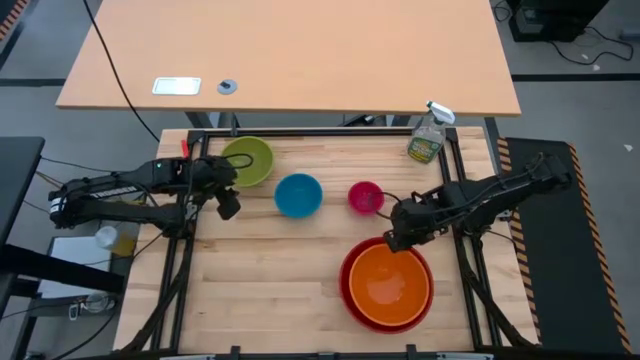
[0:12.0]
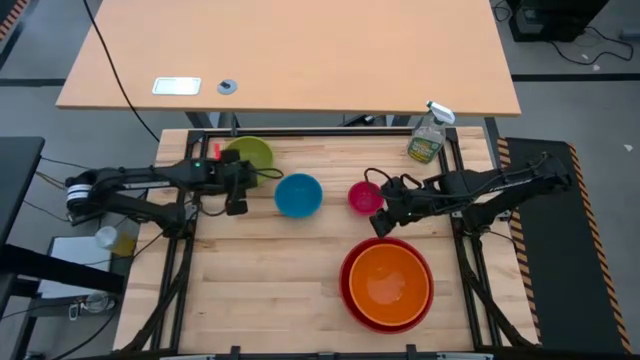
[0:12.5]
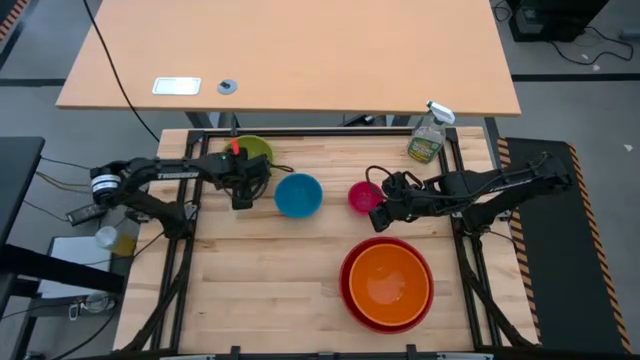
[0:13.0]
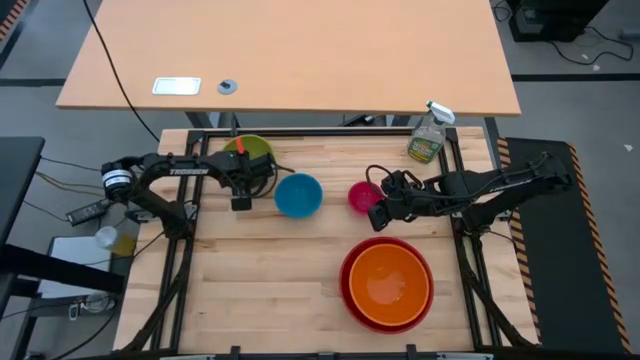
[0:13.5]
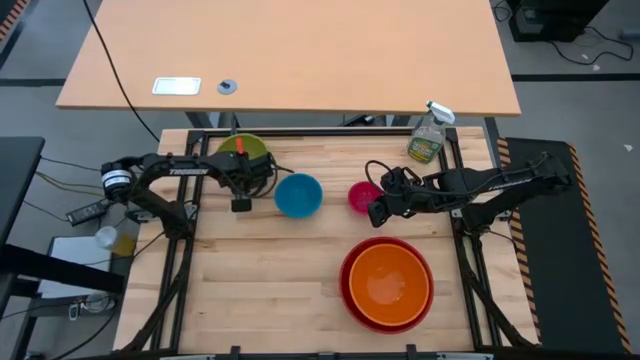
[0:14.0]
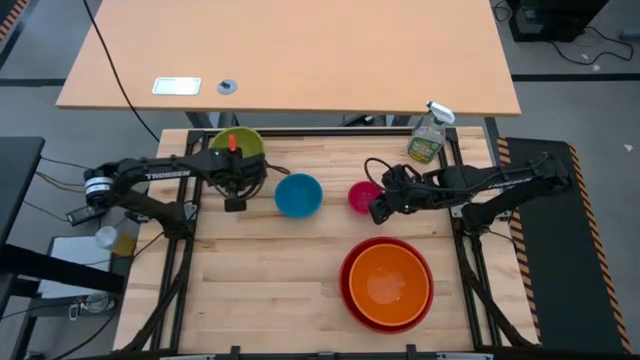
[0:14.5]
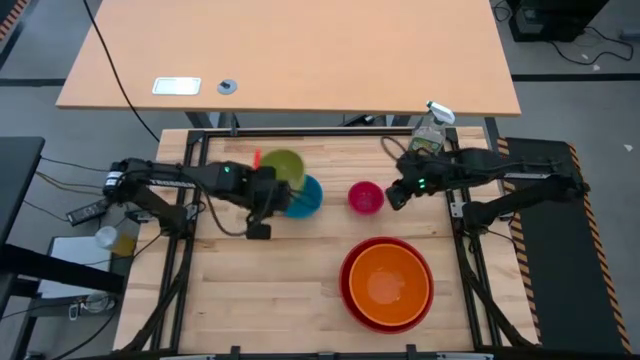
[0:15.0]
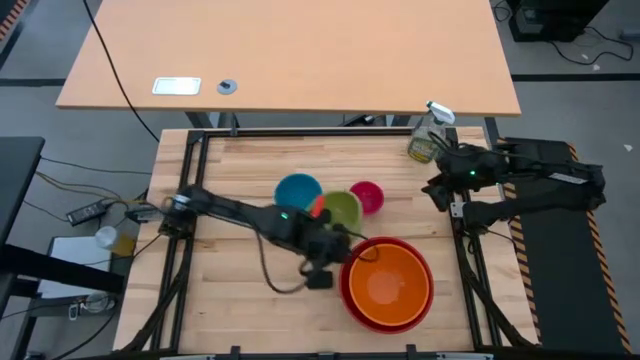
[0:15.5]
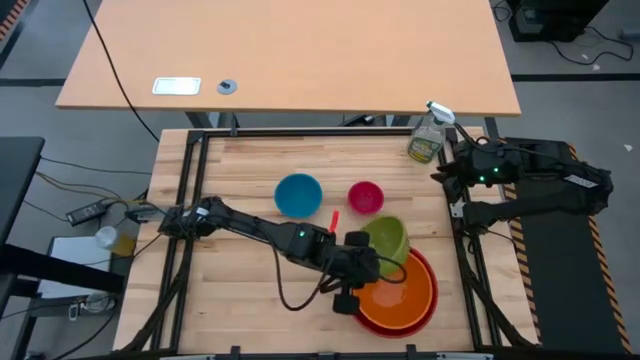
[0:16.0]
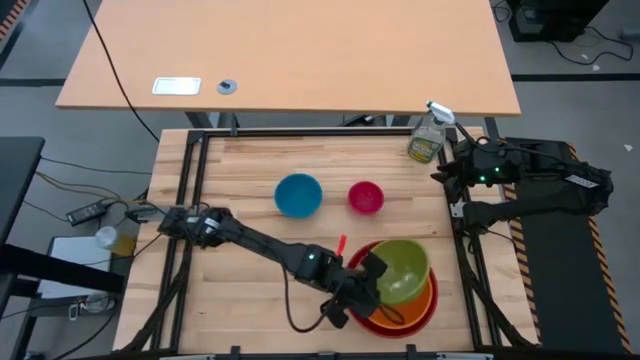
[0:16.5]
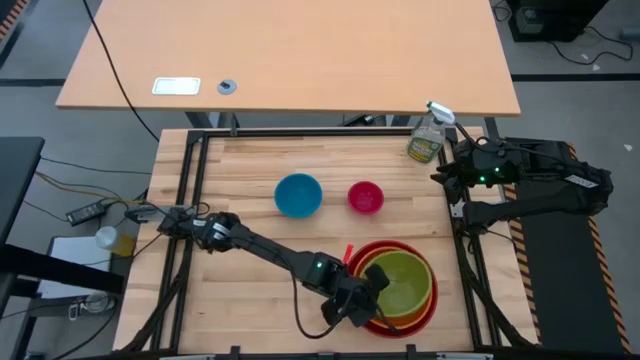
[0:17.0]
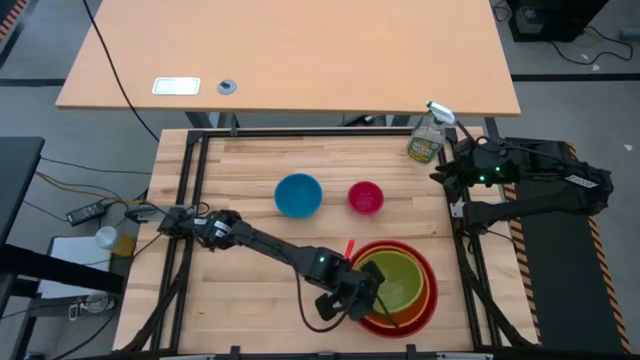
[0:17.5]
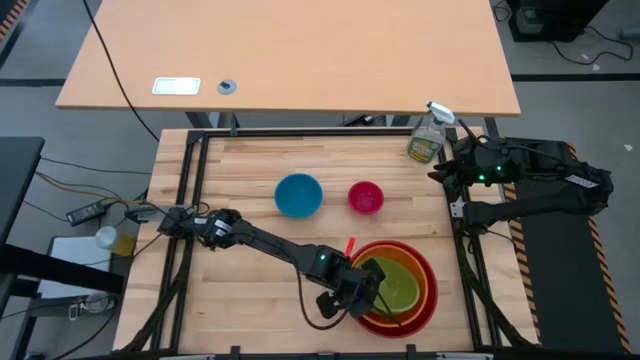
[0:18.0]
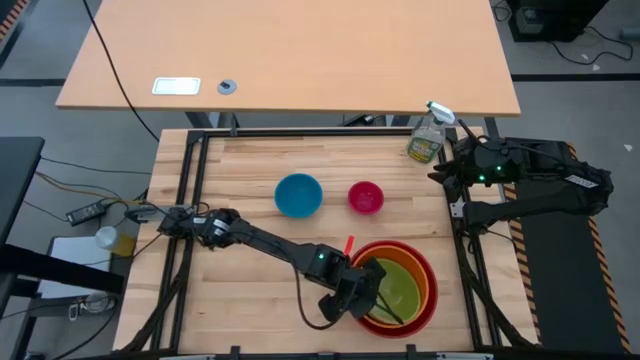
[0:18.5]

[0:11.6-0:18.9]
Stack the green bowl on top of the orange bowl

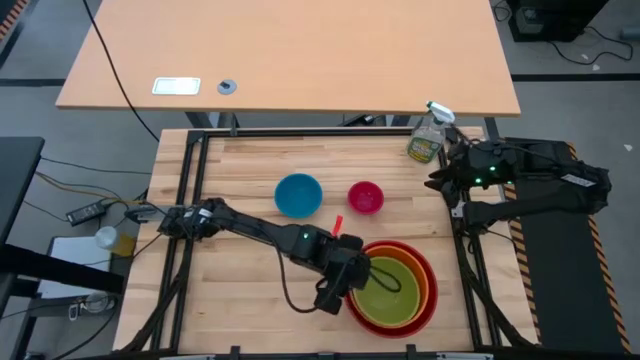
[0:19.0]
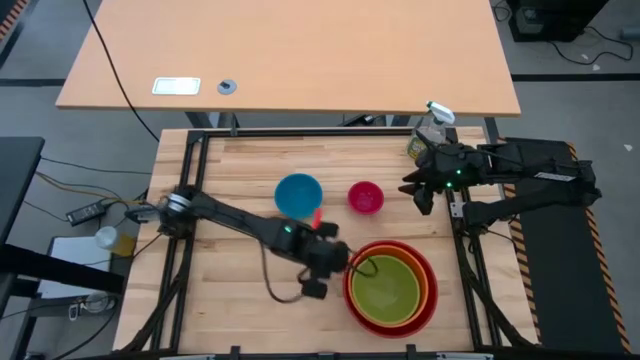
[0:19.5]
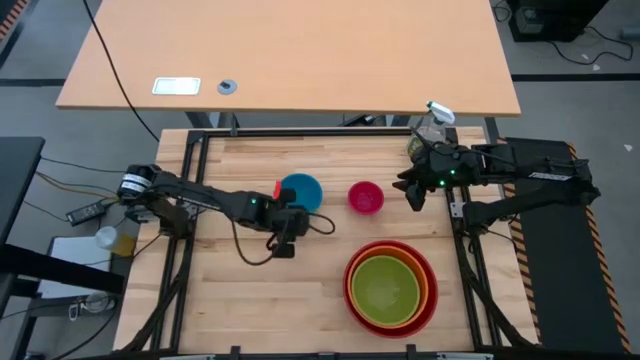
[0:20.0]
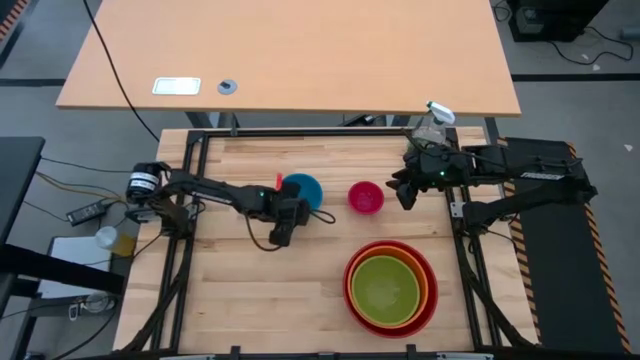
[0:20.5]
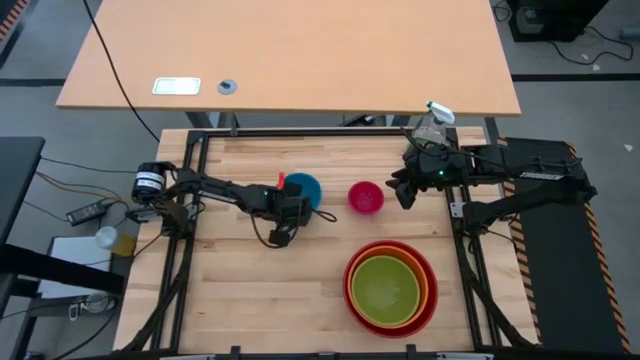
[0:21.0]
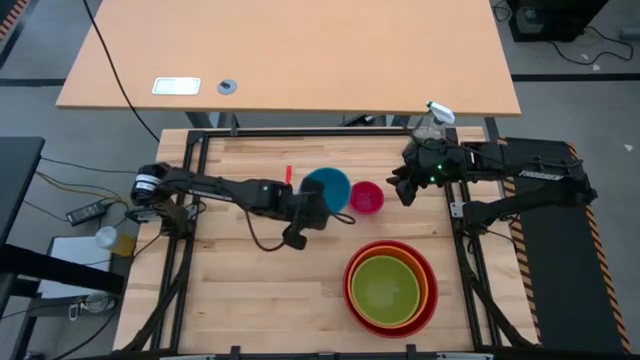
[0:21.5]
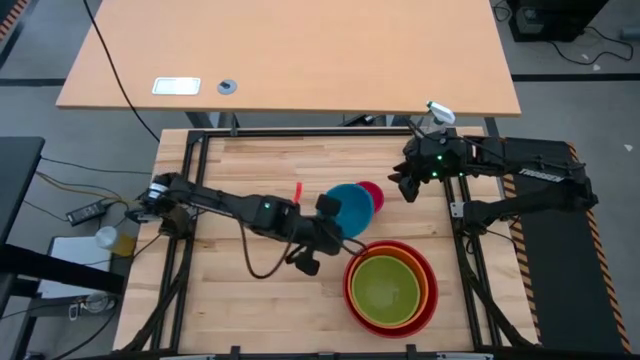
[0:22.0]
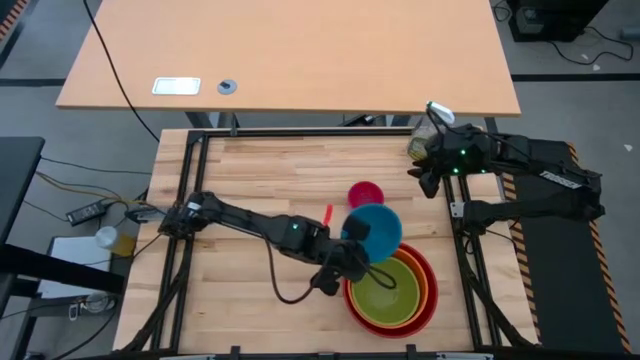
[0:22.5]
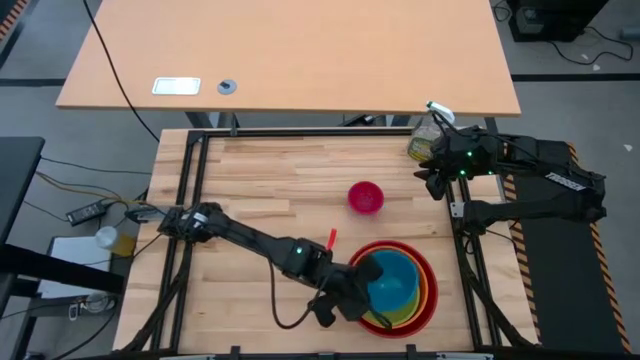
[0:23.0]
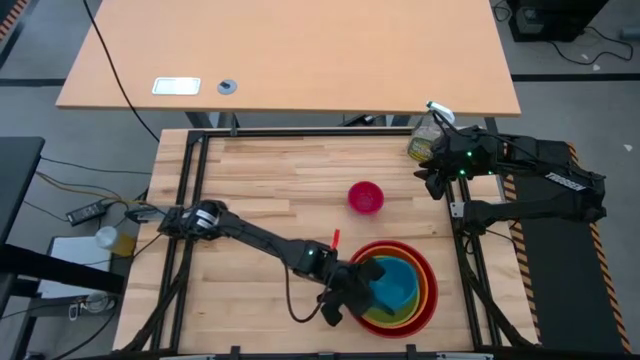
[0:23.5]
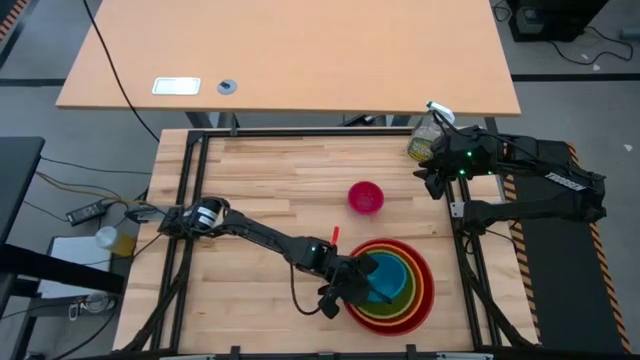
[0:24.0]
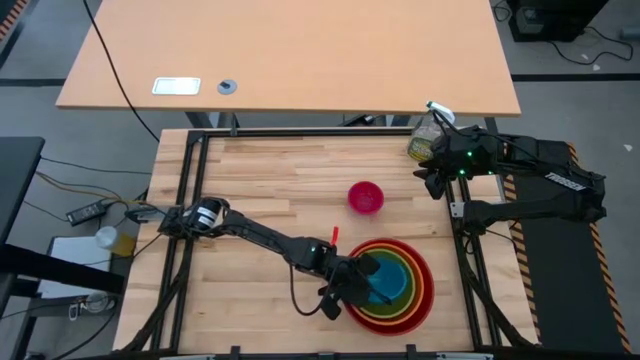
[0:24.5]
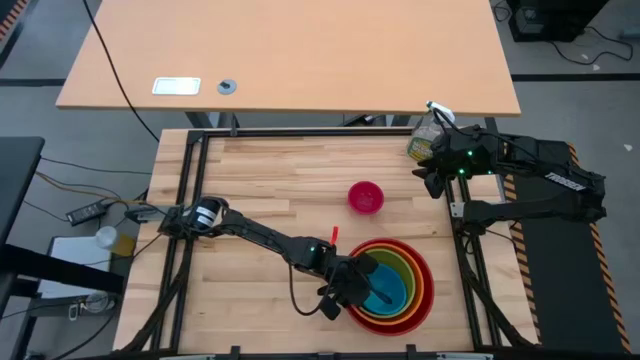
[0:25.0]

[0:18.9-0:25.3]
Stack the blue bowl on top of the green bowl

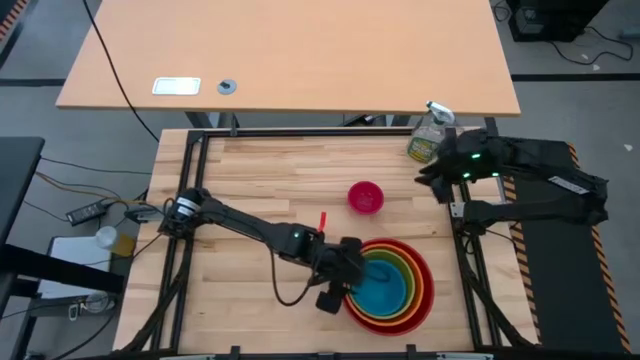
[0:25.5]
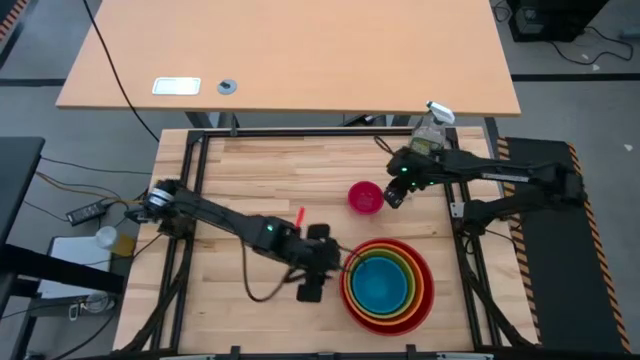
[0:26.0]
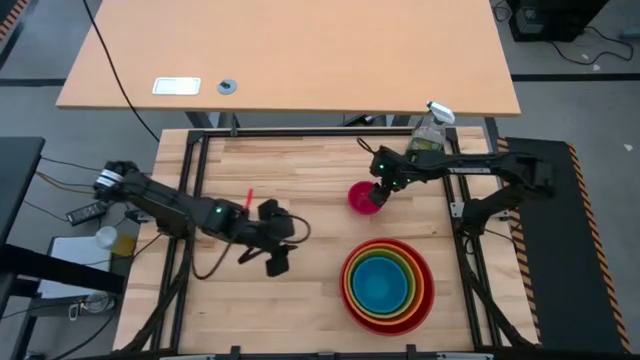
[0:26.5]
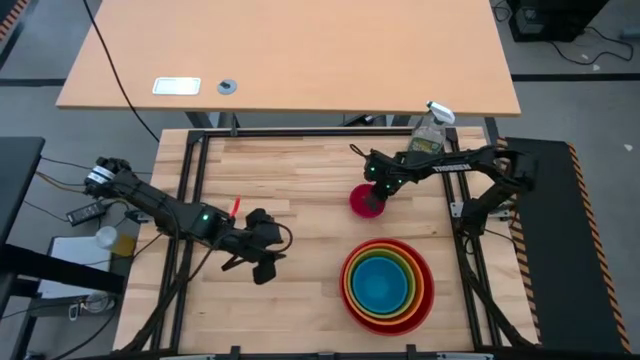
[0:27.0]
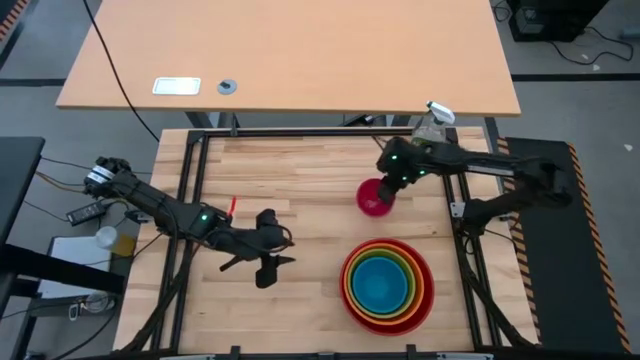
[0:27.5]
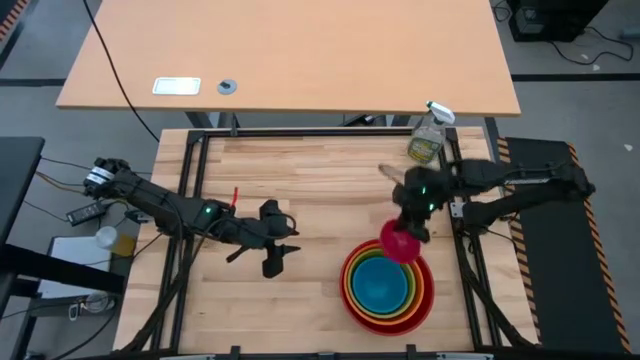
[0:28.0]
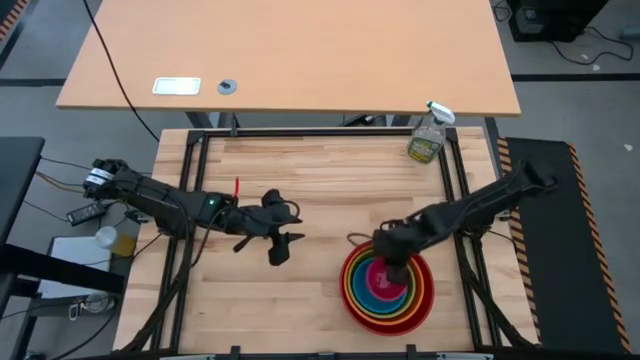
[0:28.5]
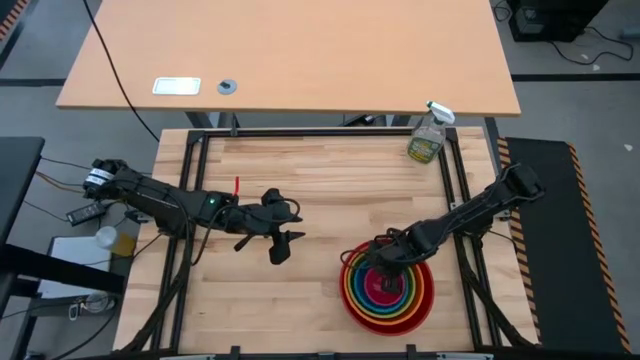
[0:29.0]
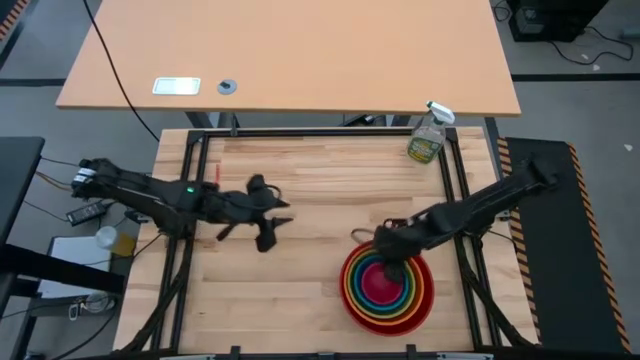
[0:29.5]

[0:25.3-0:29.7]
Stack the pink bowl on top of the blue bowl

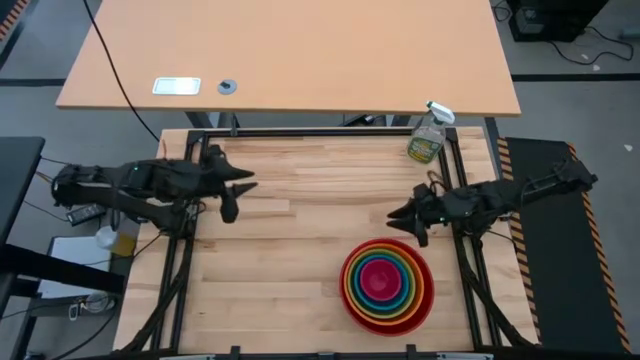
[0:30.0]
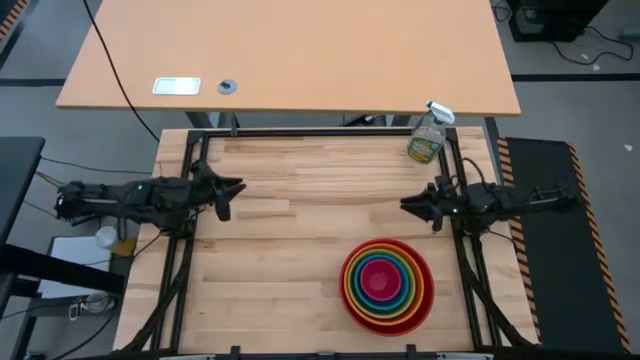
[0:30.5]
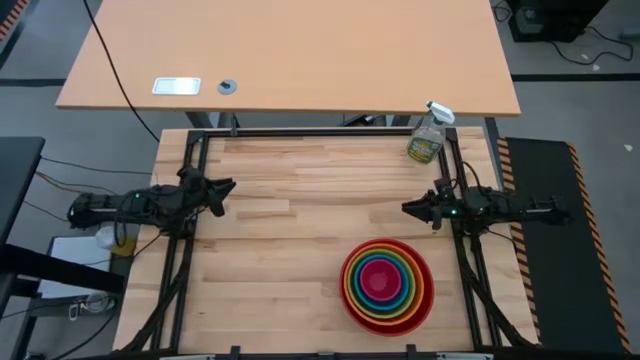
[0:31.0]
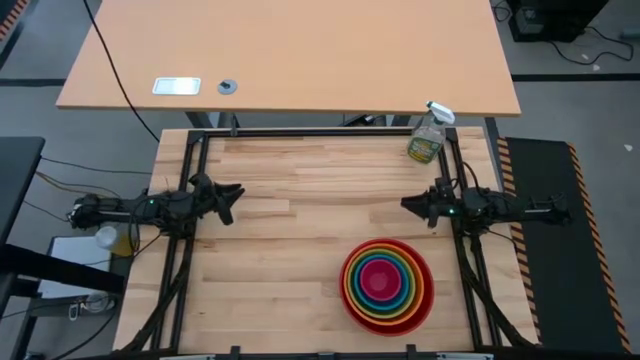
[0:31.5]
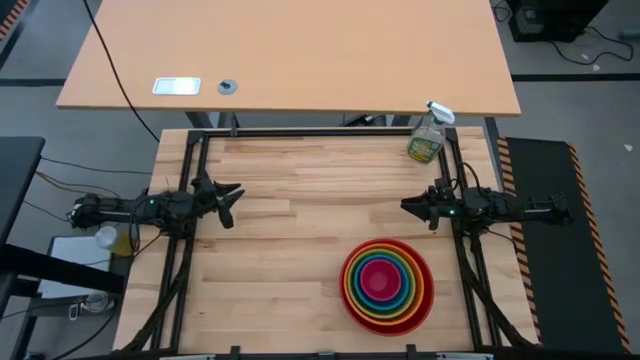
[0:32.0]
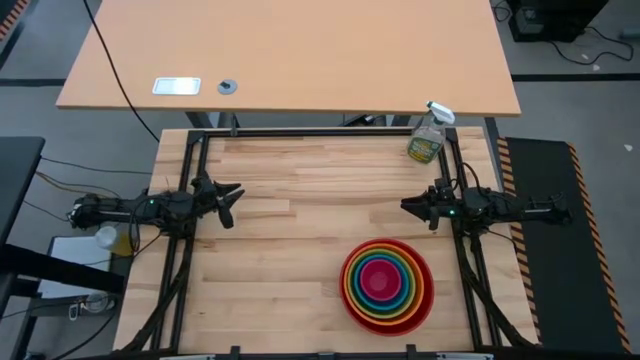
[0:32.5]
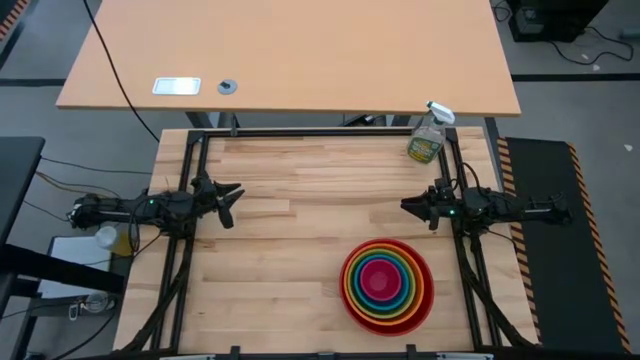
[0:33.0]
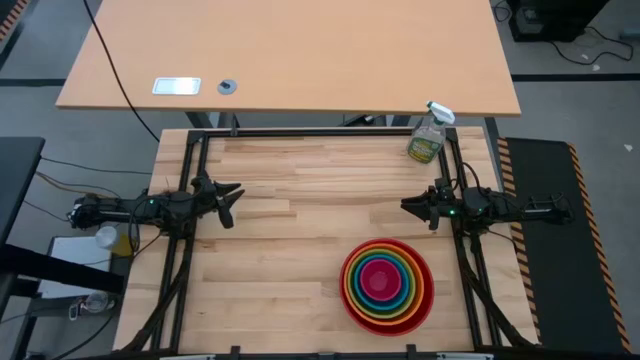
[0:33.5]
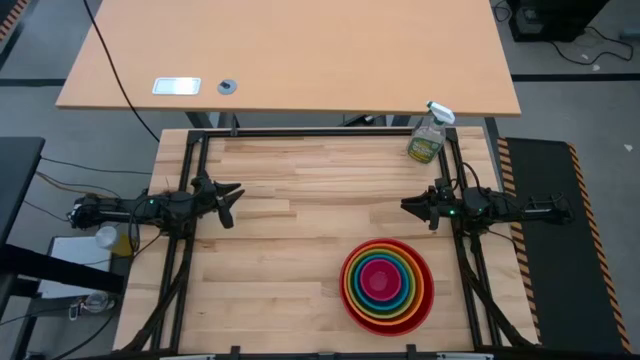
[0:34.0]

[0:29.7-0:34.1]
Return to Home Position
